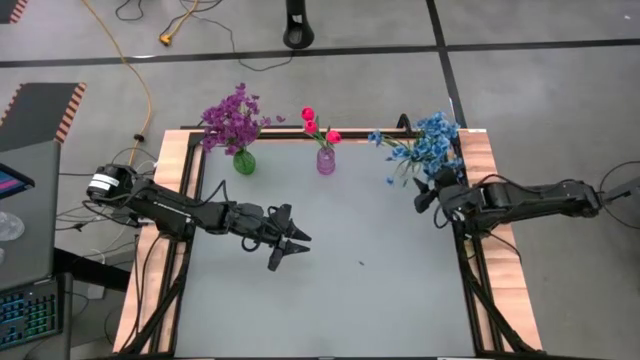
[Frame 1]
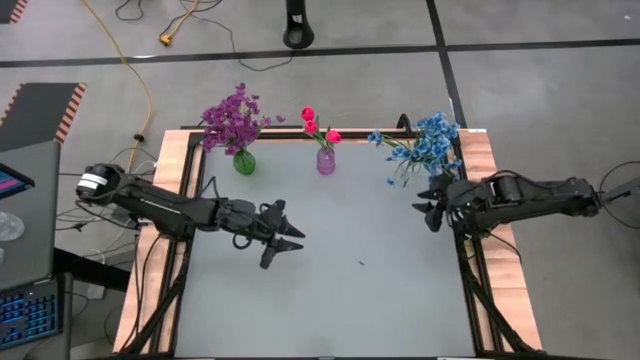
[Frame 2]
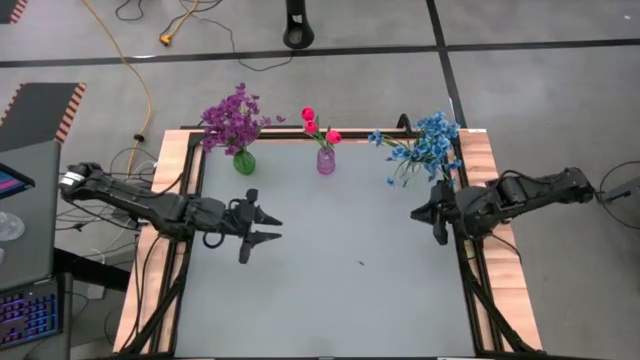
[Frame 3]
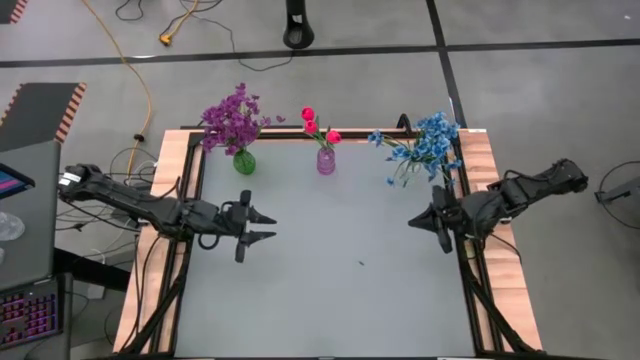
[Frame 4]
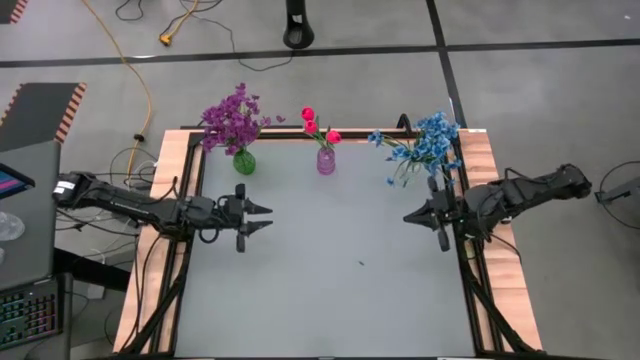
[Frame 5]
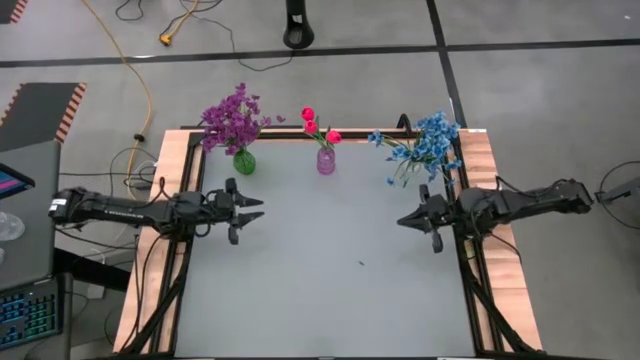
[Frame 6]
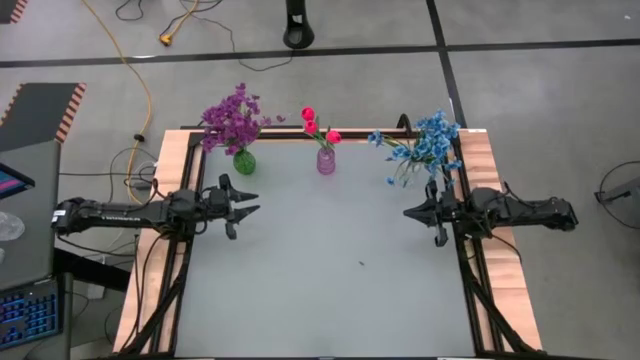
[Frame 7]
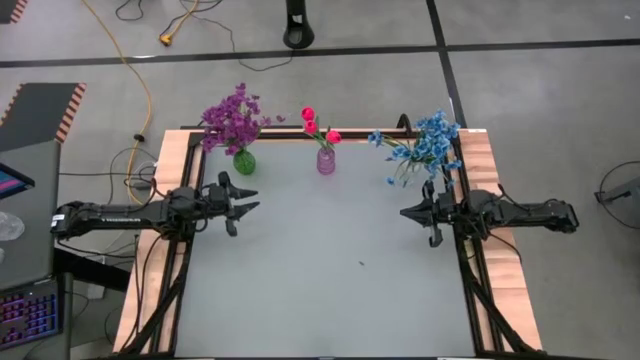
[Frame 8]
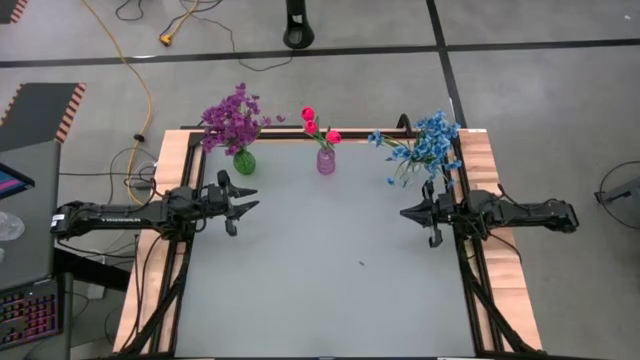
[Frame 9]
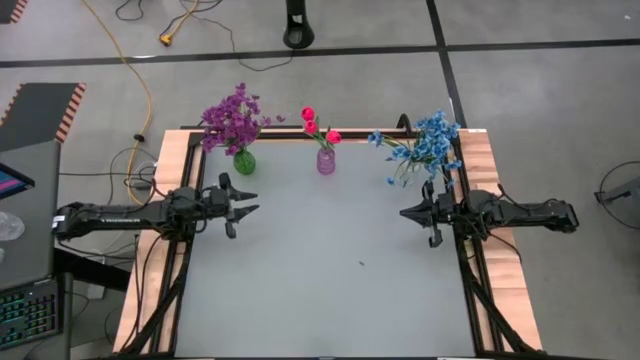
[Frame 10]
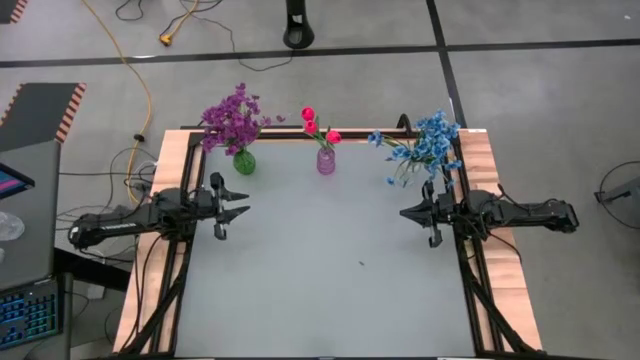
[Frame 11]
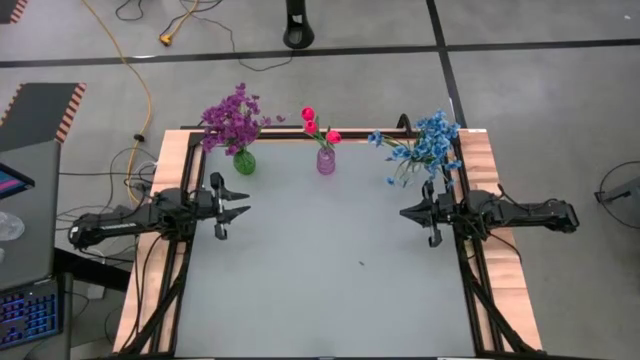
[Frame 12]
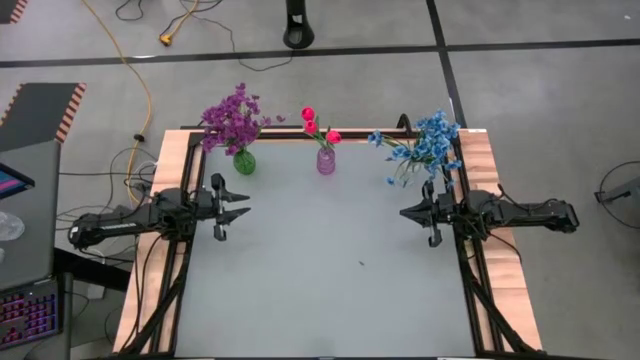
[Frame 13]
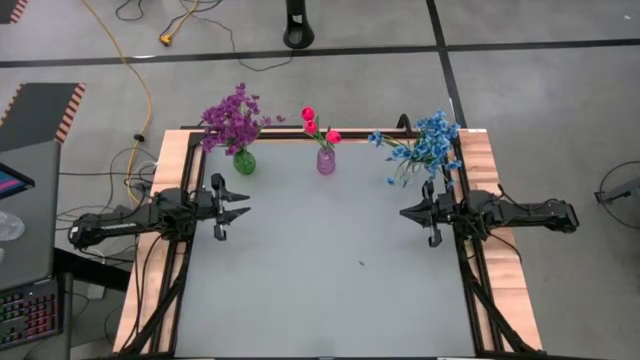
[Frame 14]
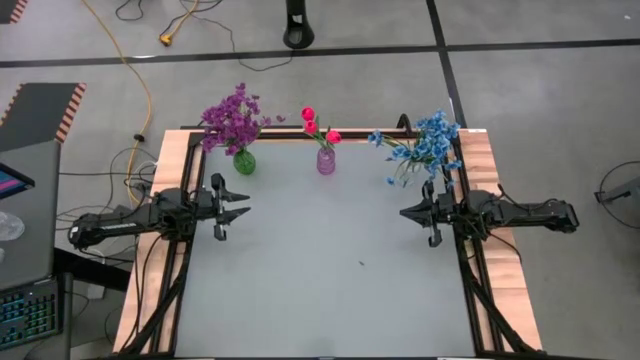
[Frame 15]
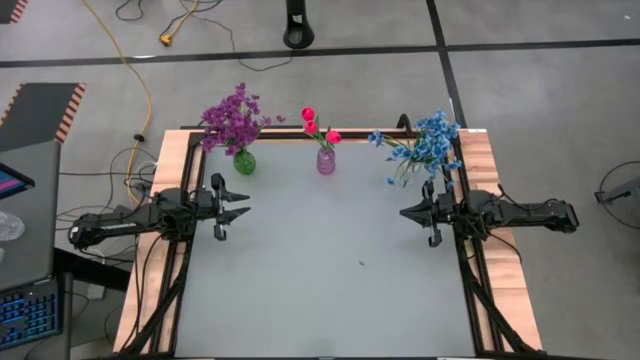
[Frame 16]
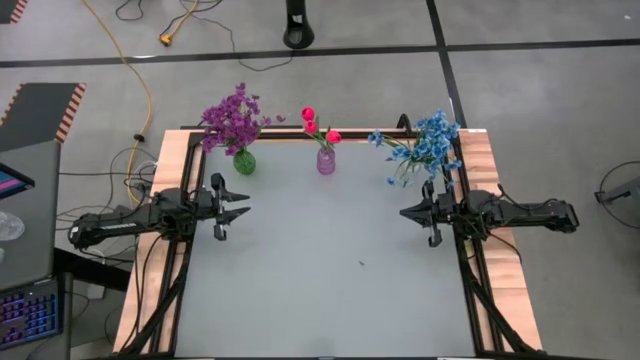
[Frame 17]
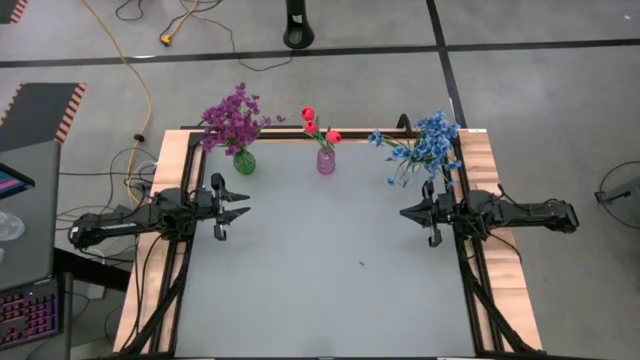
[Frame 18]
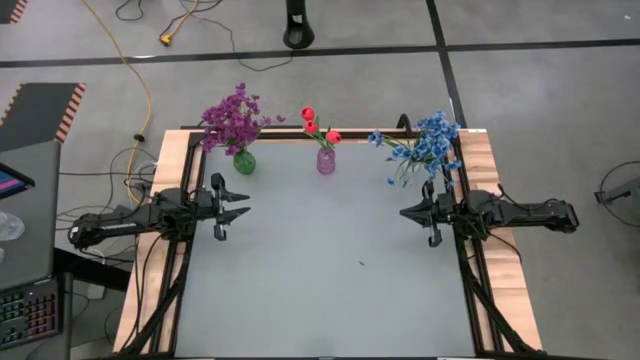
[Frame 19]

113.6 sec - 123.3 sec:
Task: Sort flowers into vase by color
Return to home position

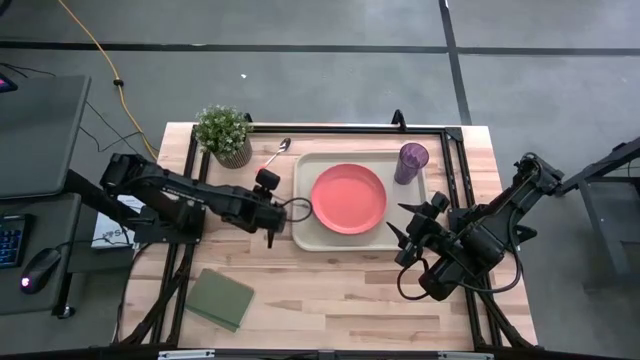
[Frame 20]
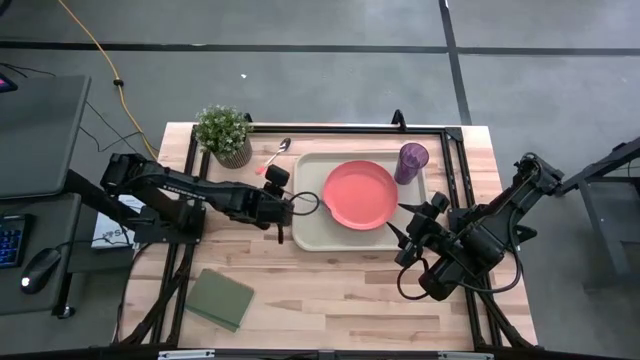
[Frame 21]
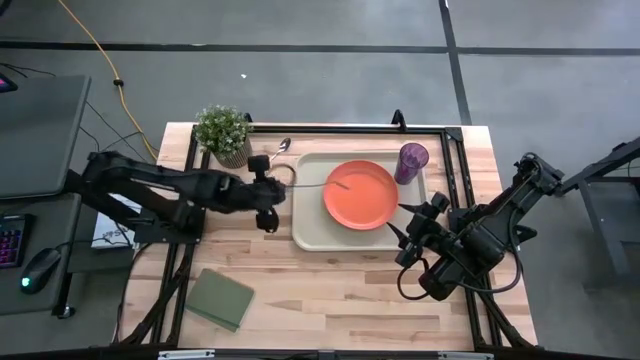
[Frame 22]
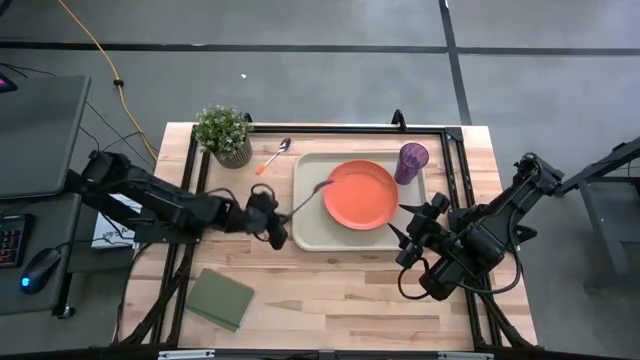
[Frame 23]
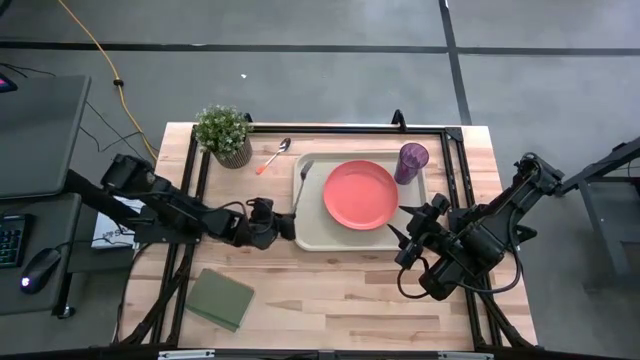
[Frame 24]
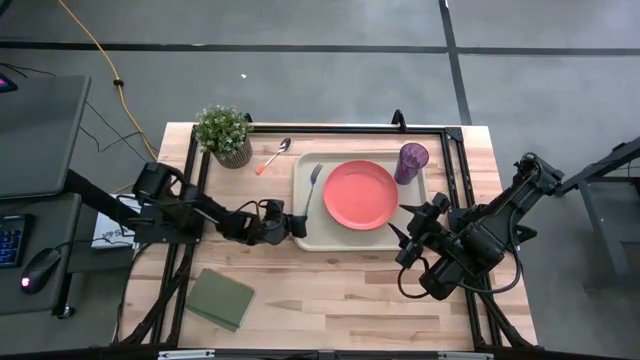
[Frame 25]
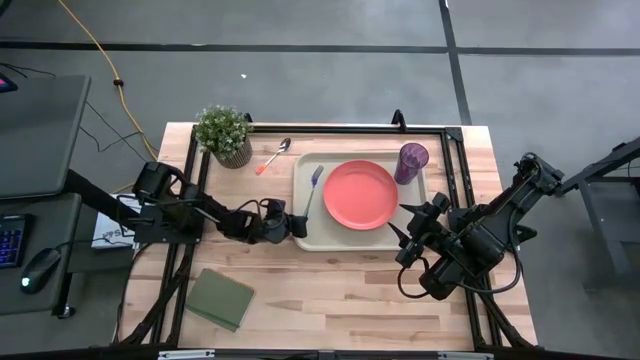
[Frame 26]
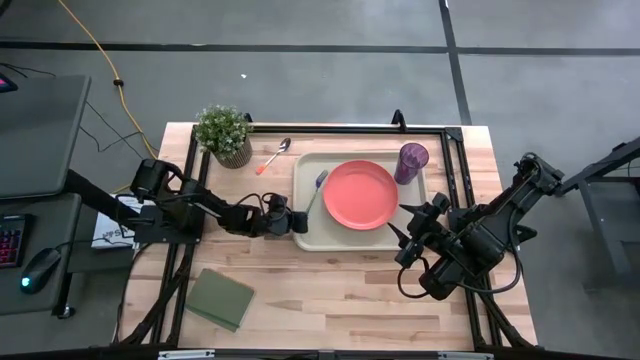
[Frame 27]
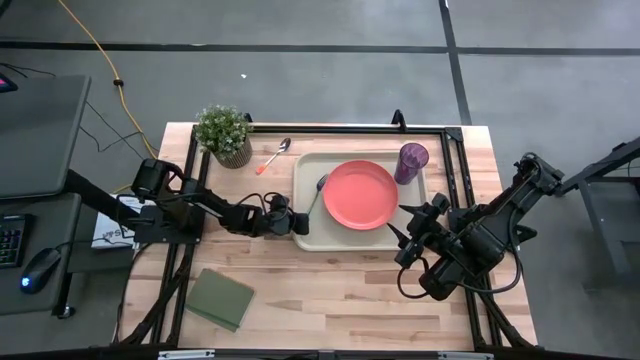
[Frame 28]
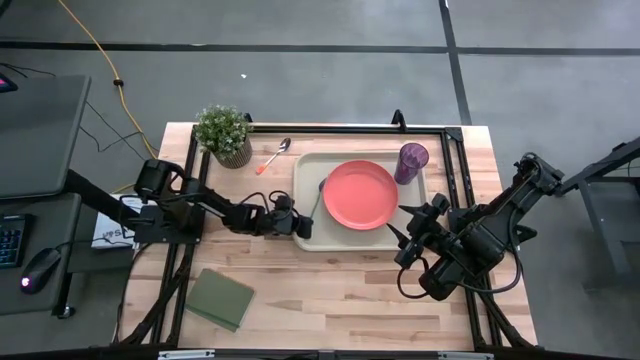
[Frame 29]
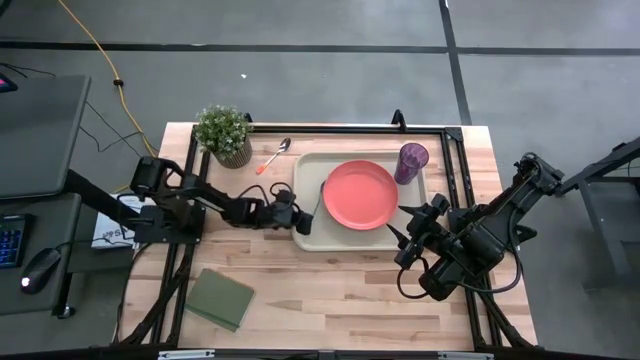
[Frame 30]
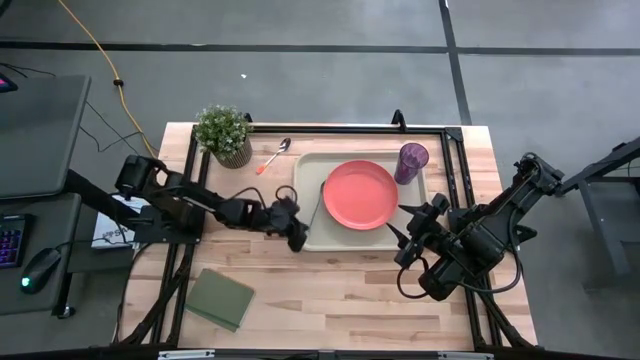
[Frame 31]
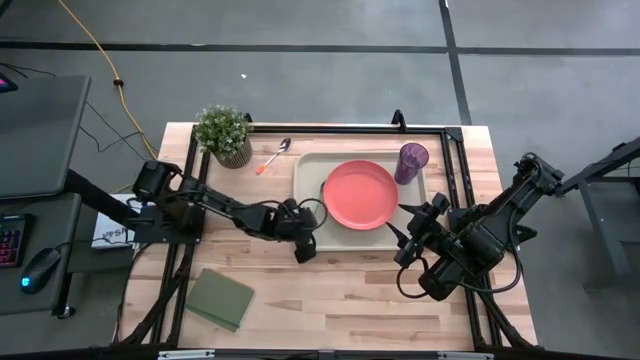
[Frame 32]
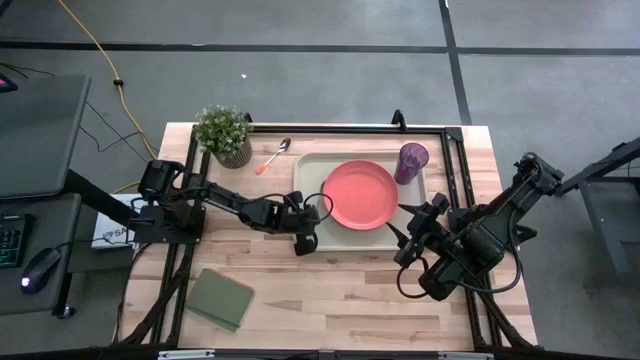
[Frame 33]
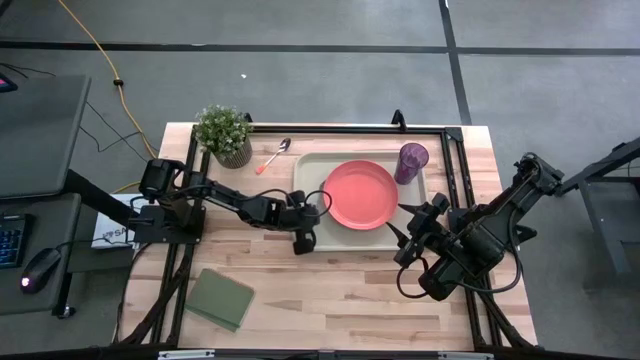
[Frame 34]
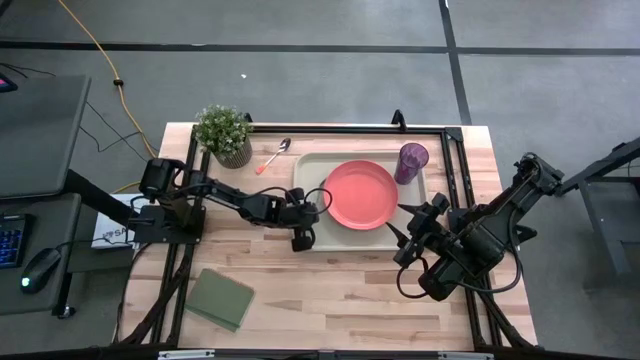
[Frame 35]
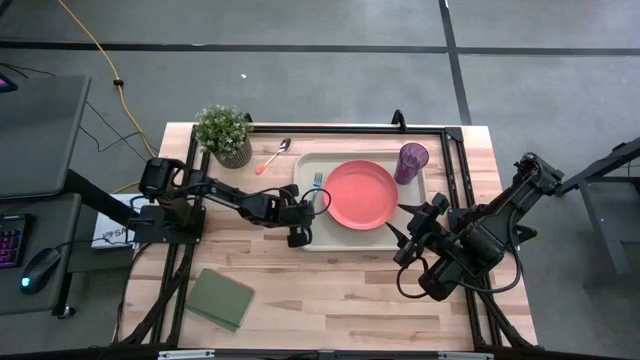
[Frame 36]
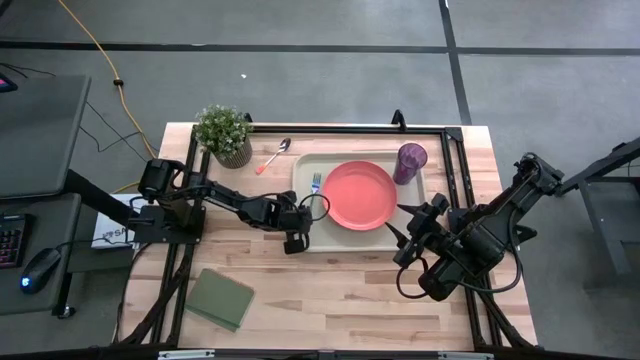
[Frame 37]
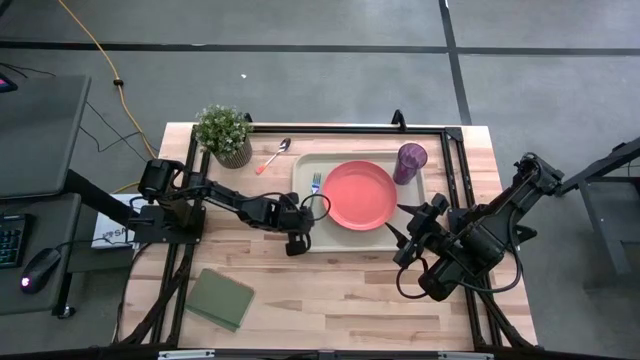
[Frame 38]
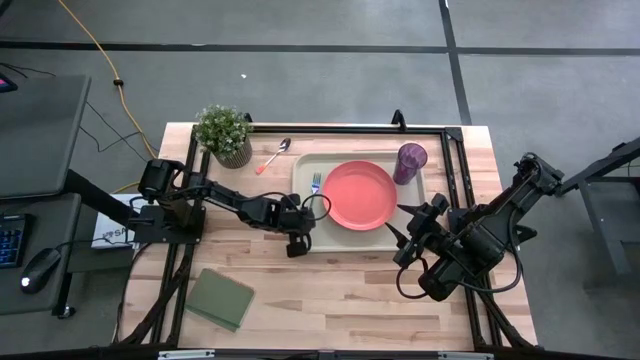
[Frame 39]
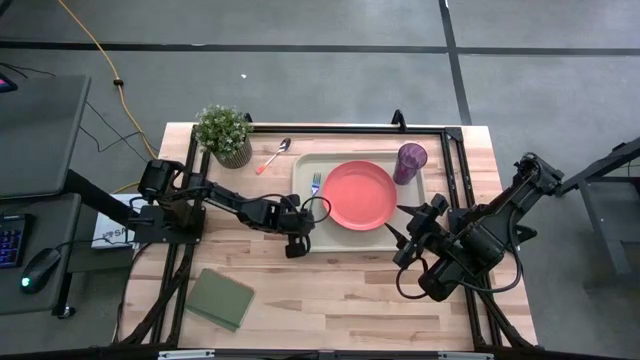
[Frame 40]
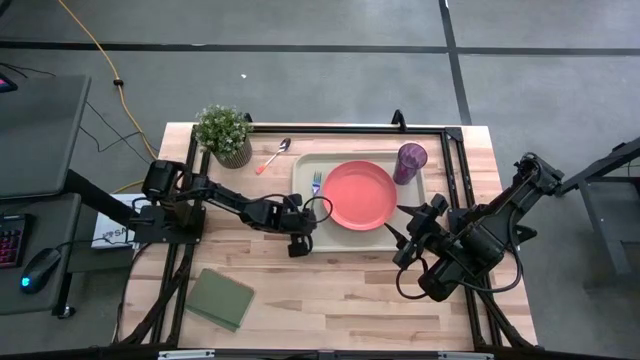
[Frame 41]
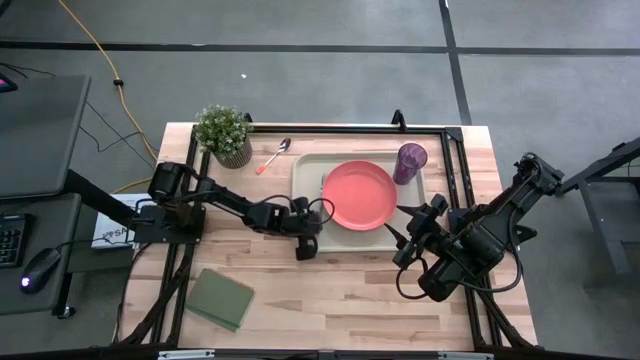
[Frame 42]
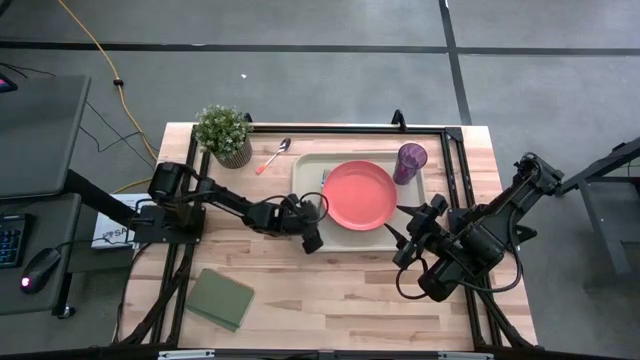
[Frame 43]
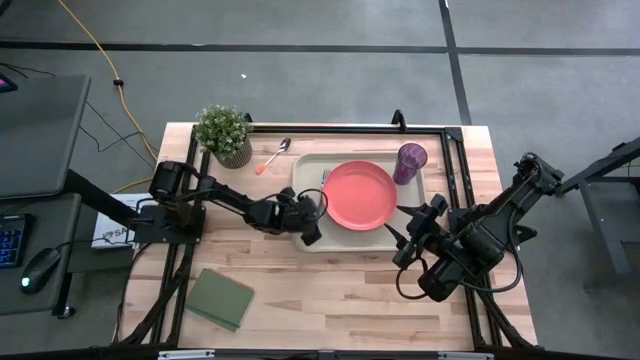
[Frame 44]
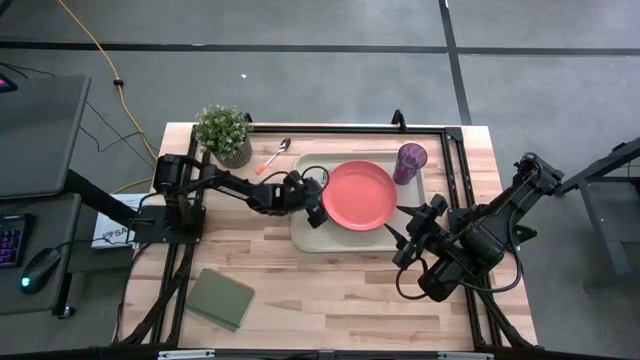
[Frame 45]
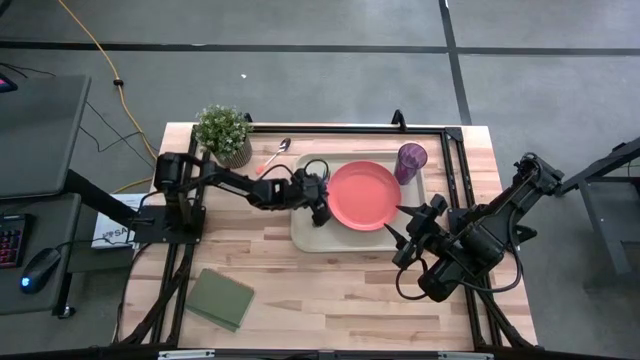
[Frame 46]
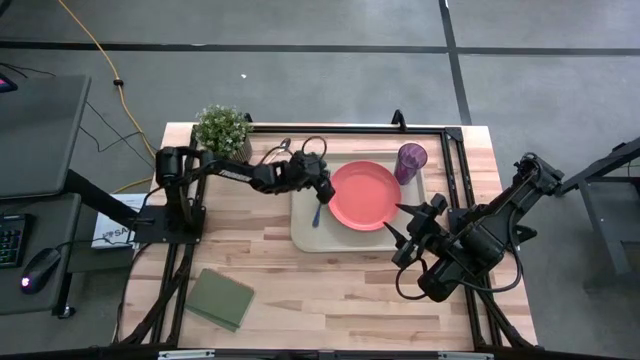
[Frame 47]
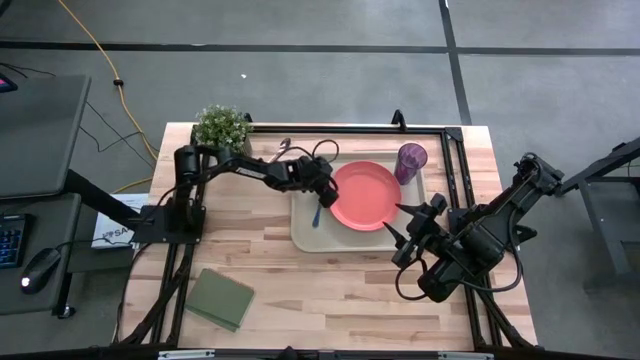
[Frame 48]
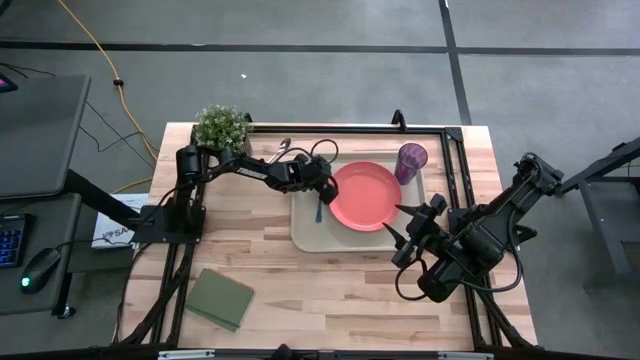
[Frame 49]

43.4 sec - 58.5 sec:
Task: Pick and place plate/cup/fork/spoon on tray
Put the blue fork on the white serving tray to the left of the orange plate
